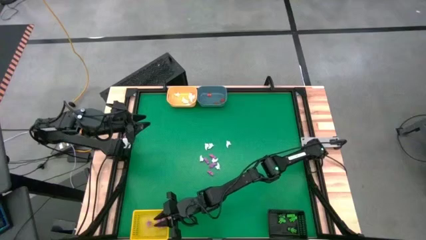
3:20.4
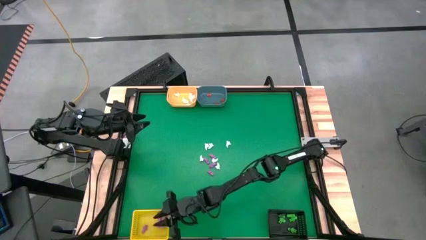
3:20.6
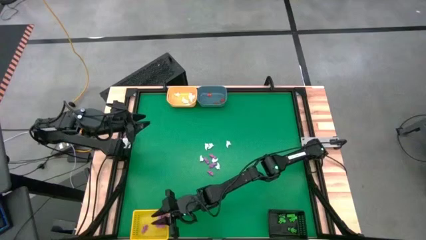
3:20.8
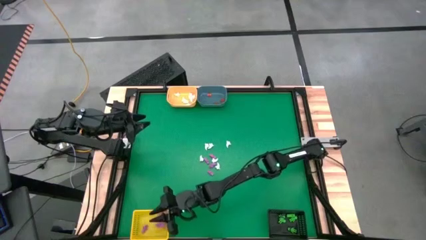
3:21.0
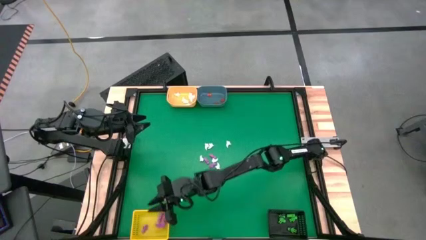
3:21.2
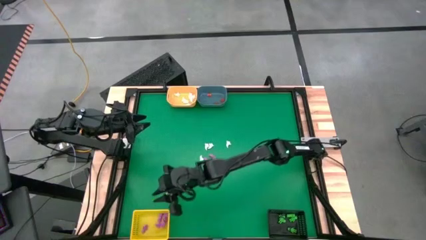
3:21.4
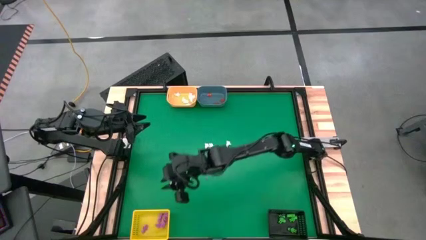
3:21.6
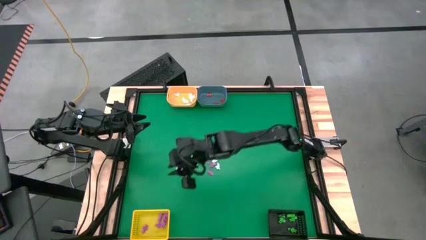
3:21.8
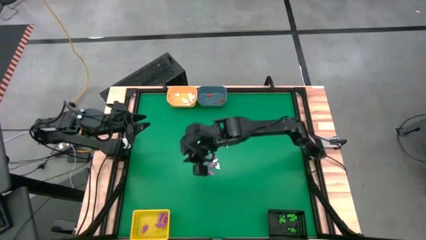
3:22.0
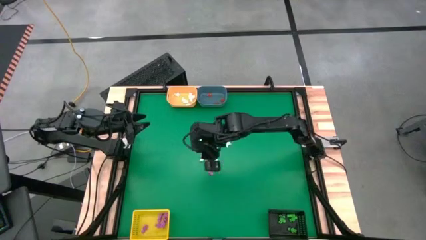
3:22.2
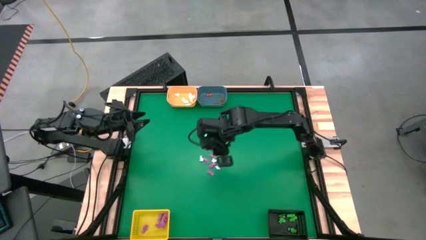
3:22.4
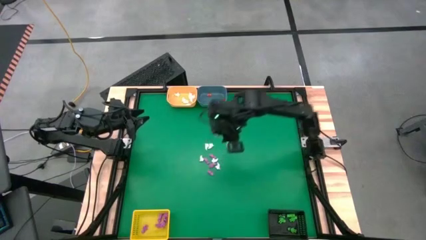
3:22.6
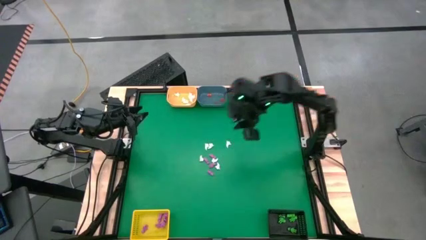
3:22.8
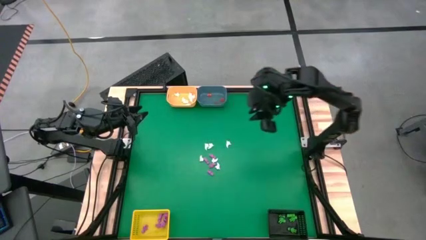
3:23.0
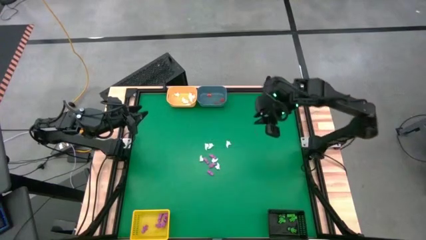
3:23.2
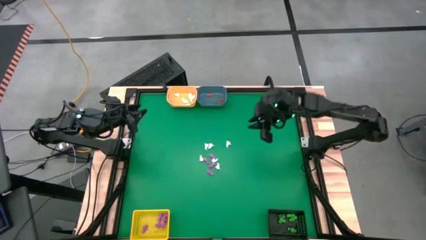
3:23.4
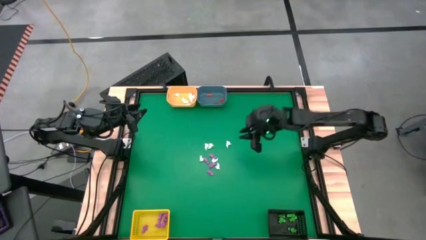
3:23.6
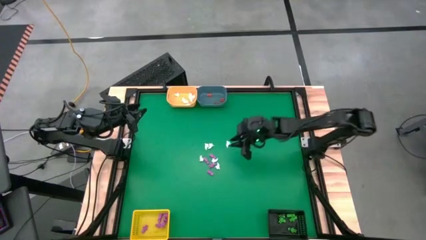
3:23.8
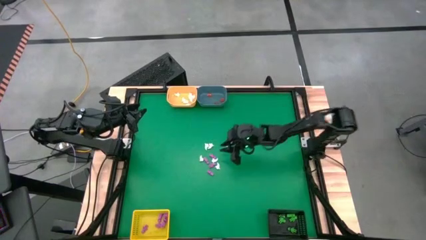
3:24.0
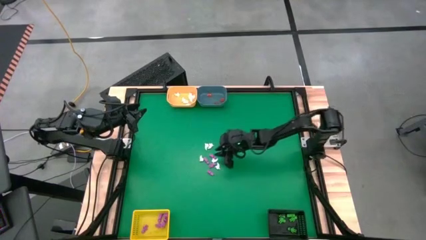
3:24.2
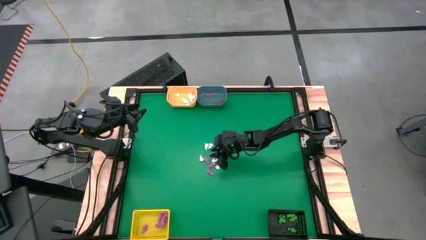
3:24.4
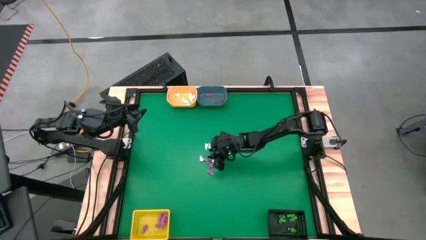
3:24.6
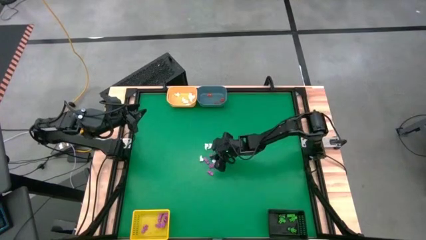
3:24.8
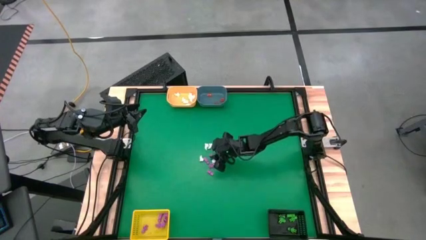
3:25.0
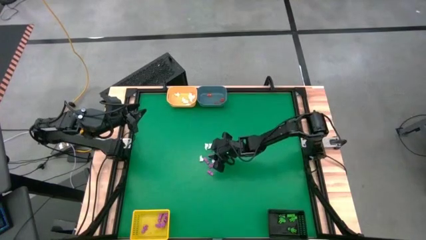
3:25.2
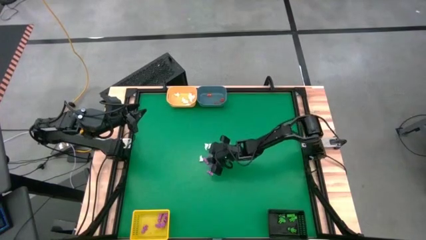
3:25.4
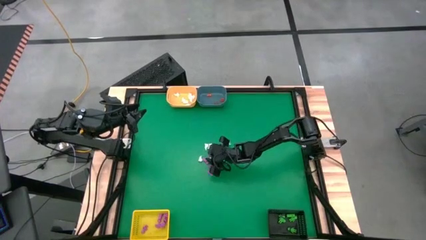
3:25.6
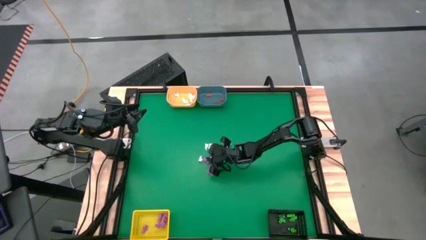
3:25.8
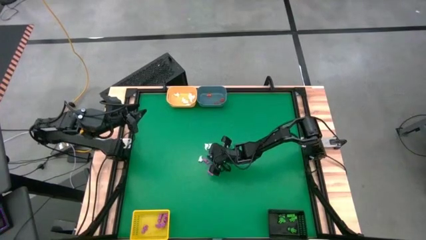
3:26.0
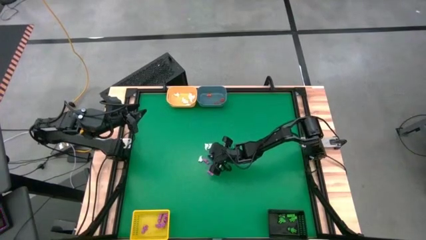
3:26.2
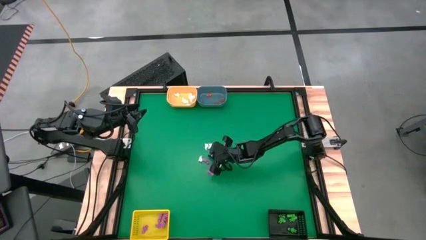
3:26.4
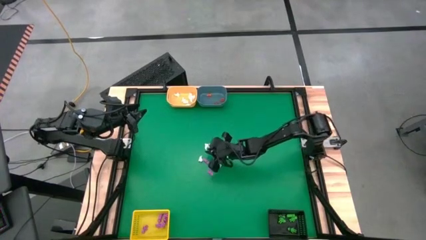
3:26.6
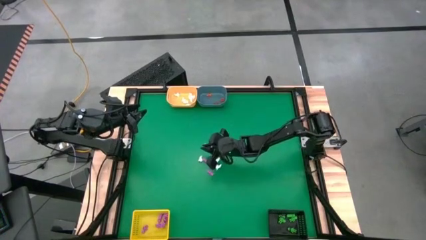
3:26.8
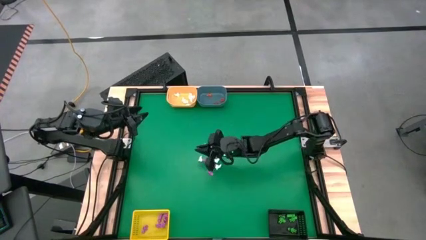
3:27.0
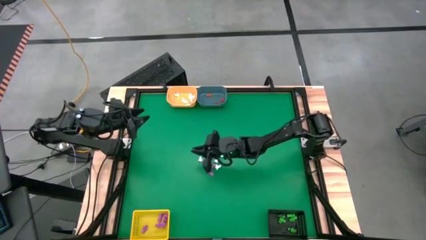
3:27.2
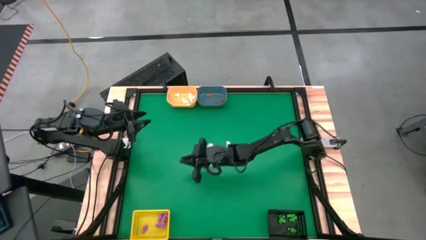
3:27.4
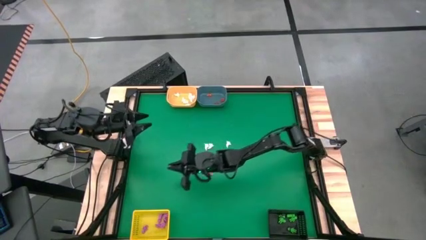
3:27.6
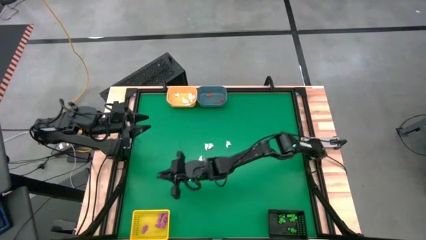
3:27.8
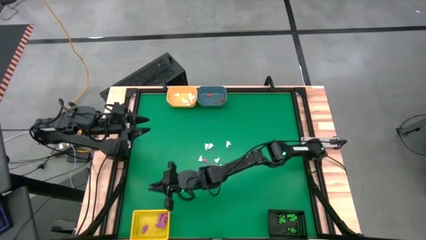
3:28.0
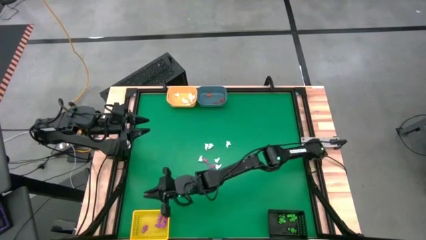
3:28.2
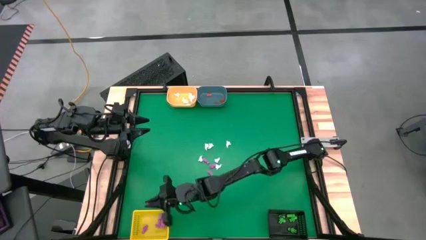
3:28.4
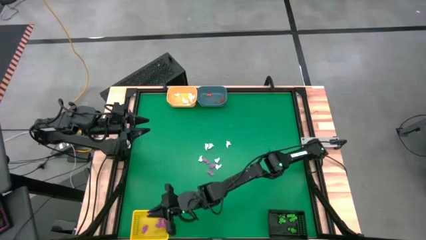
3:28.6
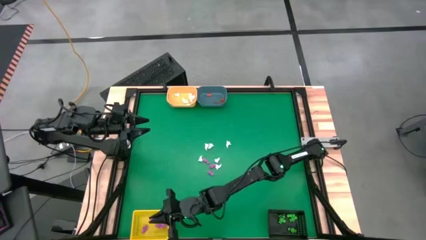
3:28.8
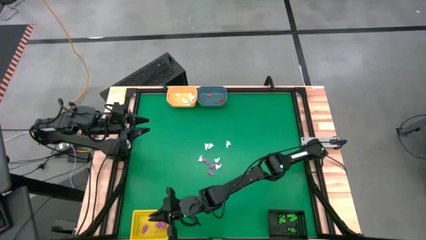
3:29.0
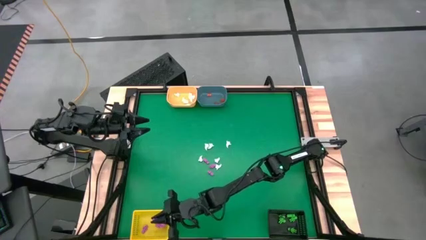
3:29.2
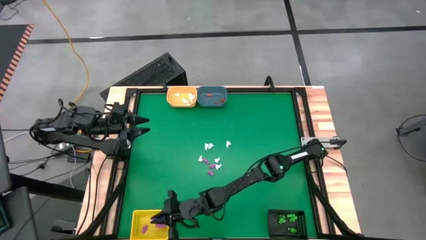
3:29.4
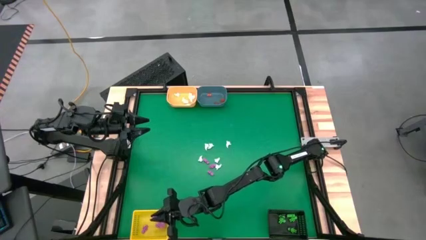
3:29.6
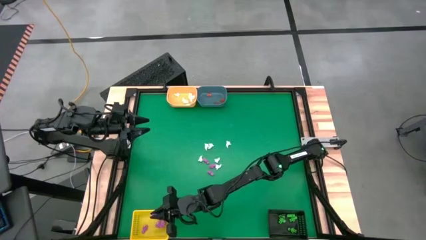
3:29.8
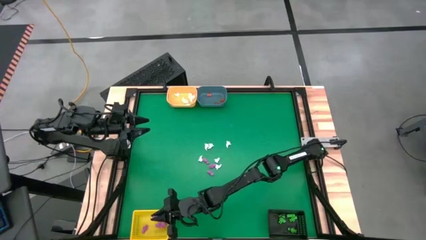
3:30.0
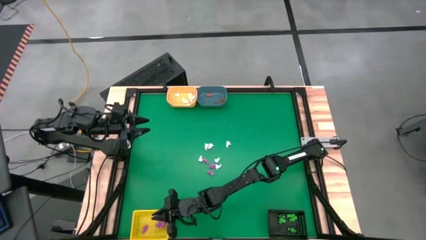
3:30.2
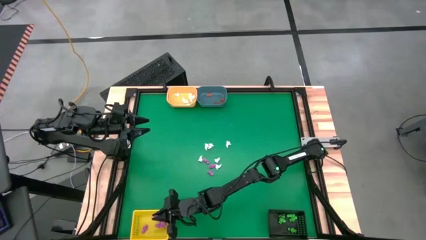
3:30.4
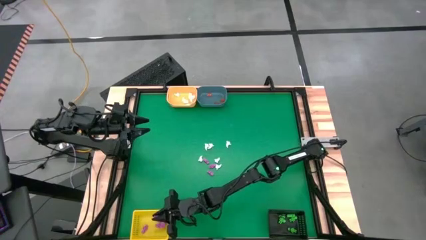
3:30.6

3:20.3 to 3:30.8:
Task: Sort Halloween decoration
Put the pink skeleton into the yellow bin

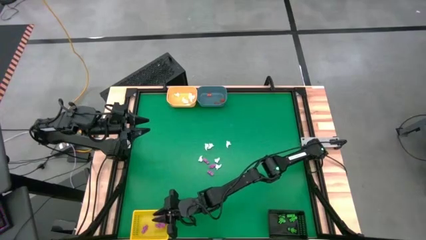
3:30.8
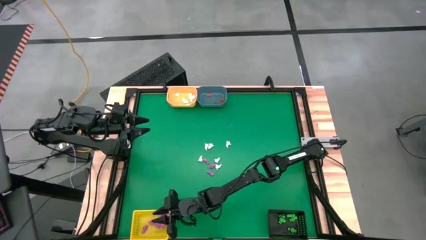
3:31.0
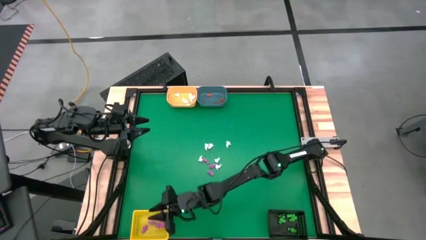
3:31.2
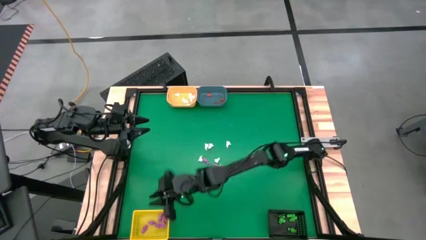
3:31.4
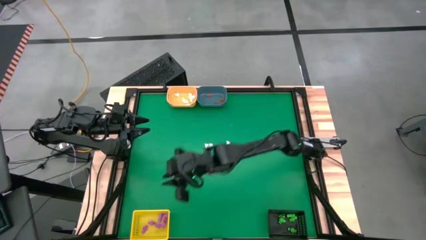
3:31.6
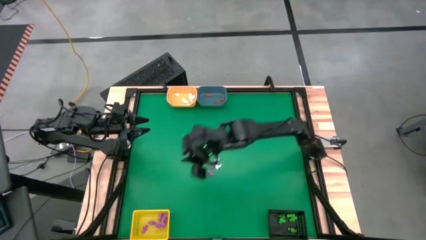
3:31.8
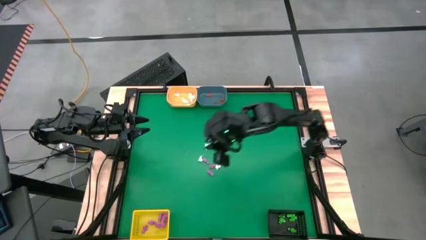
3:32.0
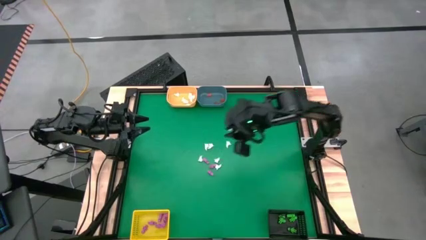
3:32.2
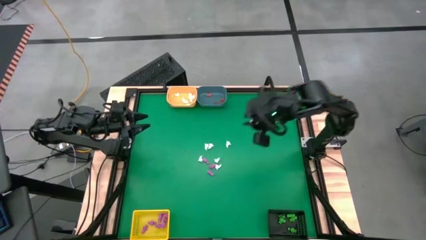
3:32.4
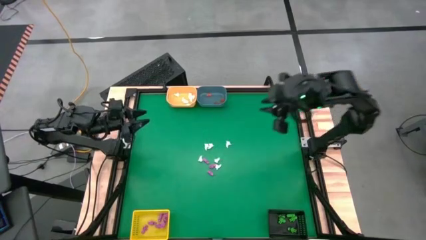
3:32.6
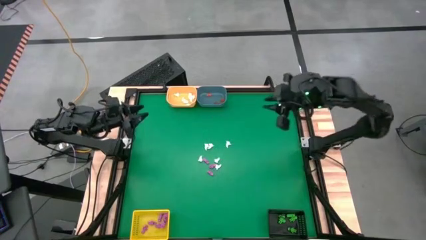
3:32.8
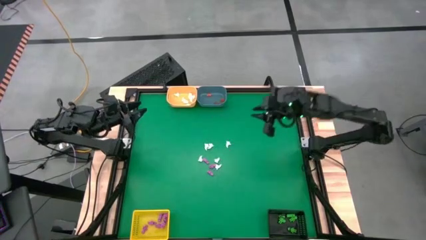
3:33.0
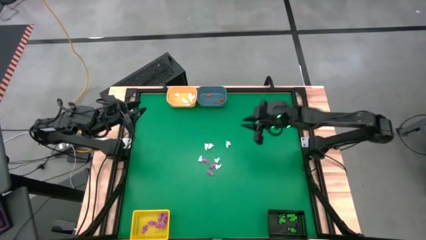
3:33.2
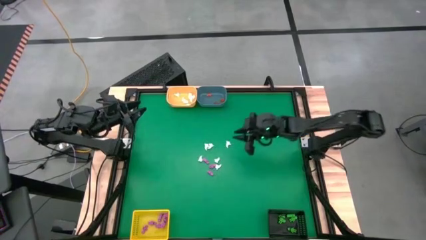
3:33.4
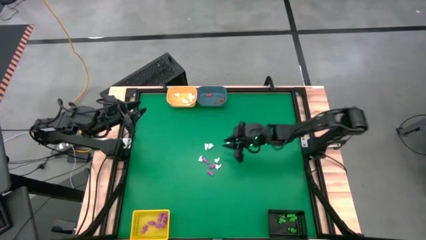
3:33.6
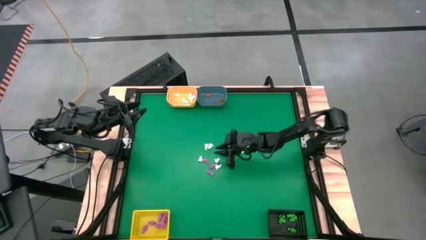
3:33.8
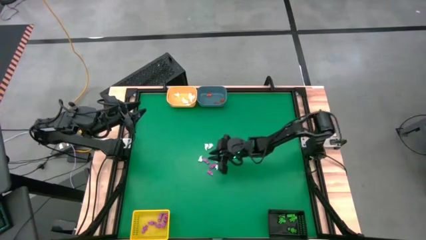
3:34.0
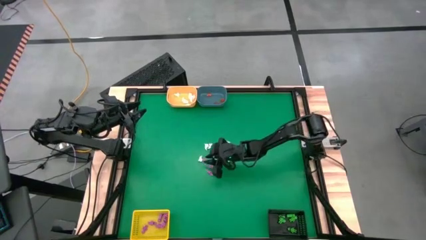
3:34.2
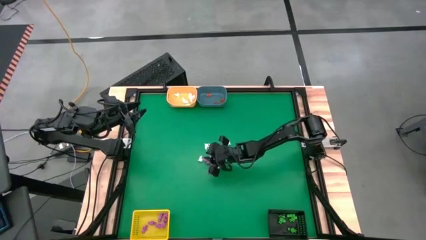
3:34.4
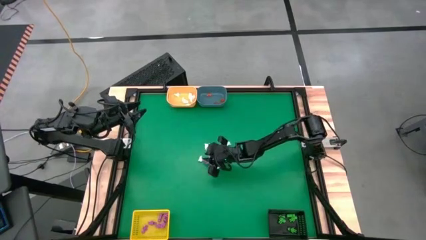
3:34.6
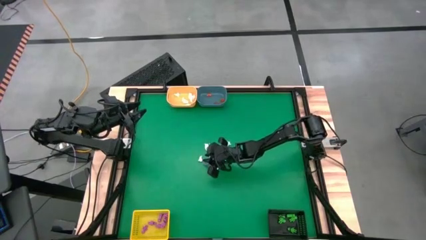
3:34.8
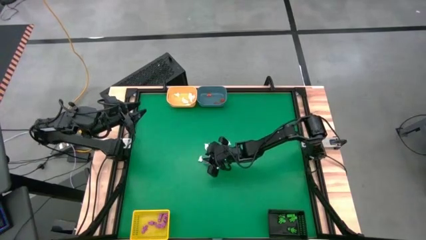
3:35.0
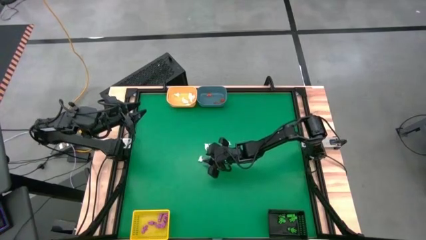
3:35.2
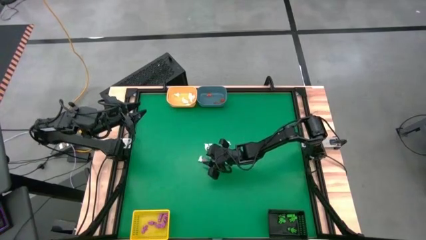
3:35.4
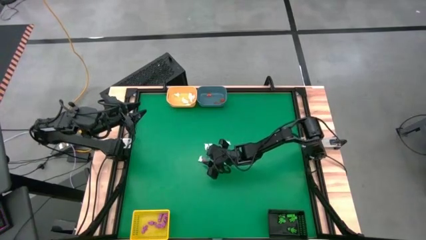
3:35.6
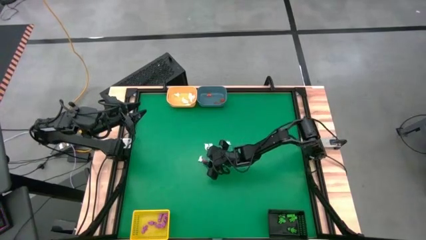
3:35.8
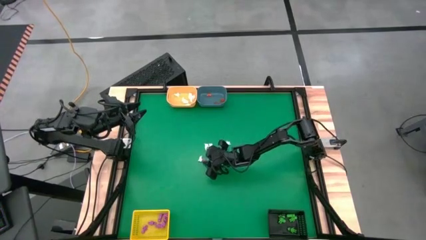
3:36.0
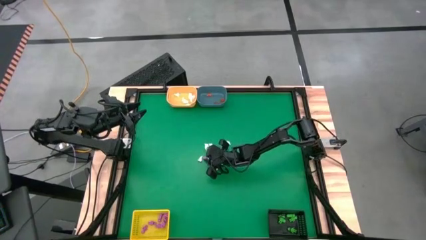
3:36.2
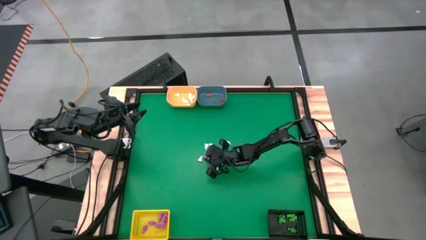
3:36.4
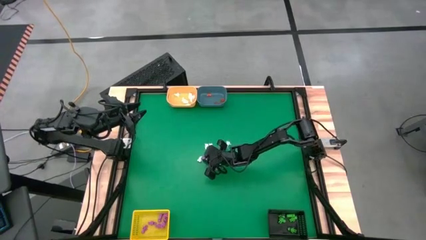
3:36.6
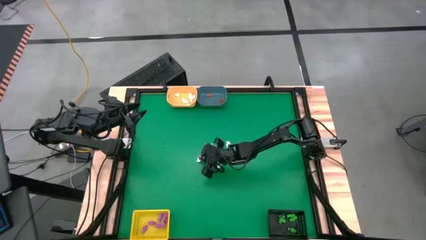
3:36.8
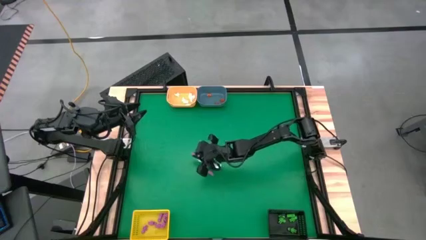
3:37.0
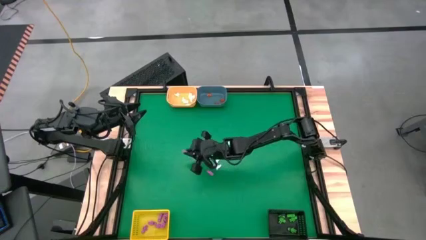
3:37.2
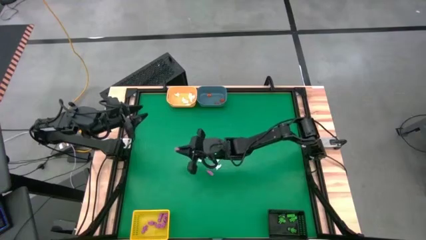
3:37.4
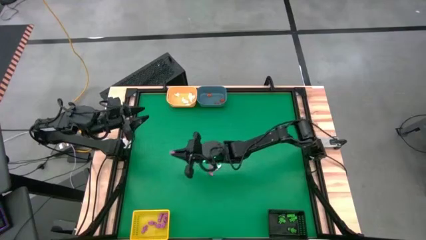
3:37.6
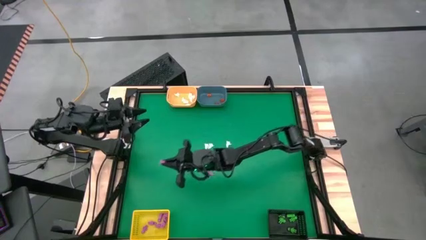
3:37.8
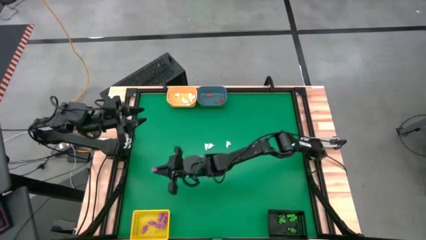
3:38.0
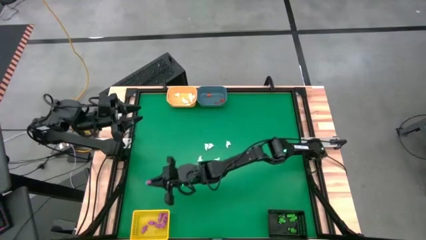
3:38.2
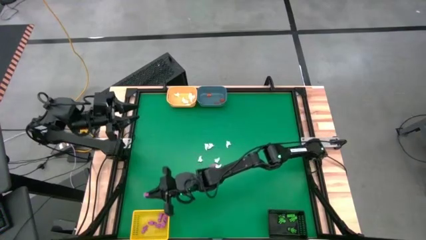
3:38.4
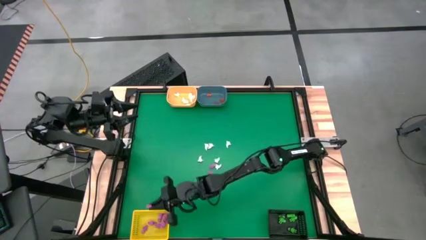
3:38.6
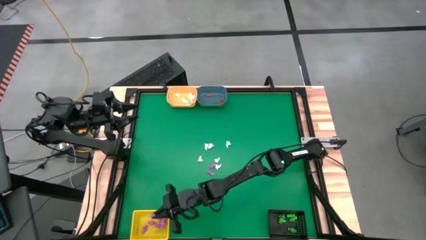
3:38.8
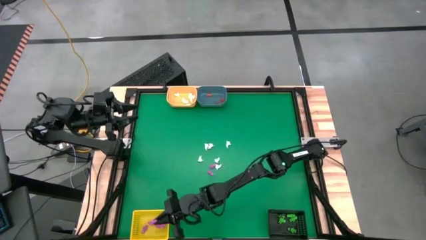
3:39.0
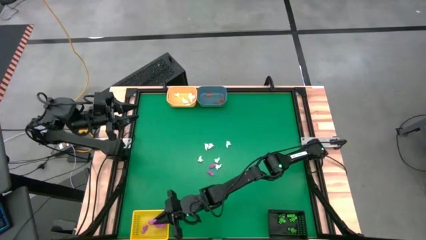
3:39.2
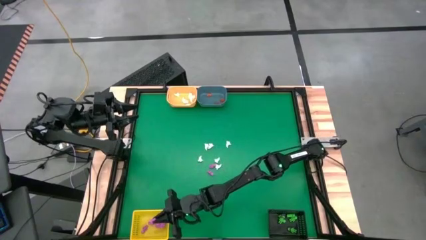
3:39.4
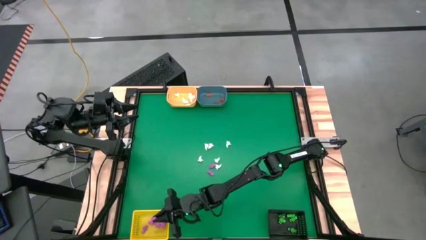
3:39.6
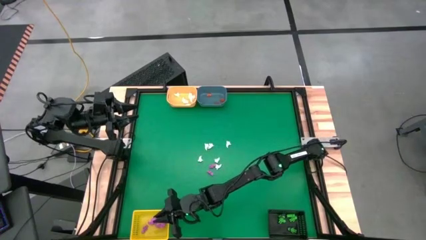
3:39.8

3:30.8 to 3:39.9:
Put the pink skeleton into the yellow bin
